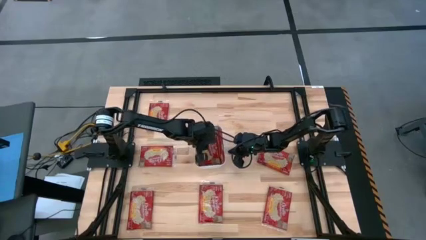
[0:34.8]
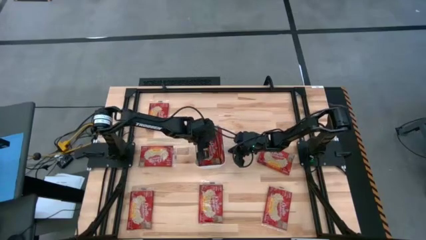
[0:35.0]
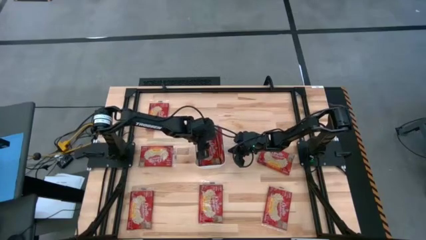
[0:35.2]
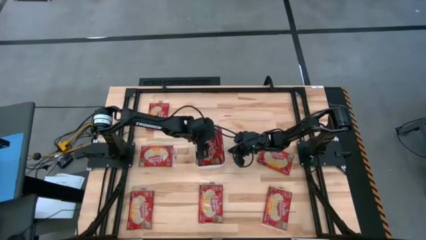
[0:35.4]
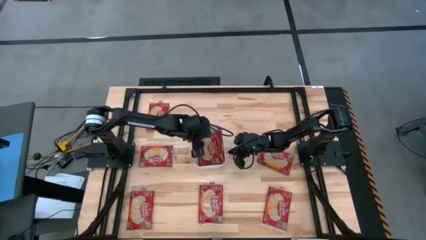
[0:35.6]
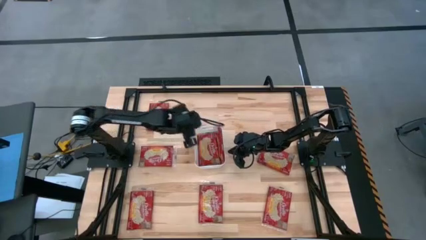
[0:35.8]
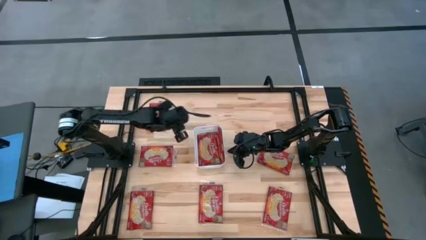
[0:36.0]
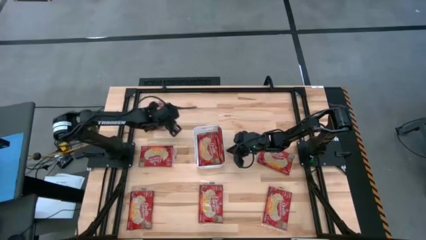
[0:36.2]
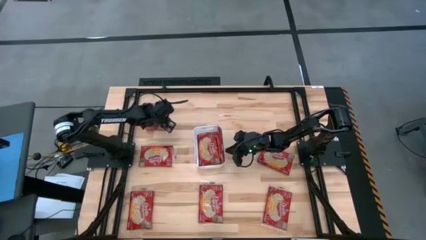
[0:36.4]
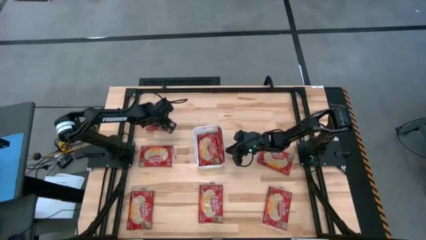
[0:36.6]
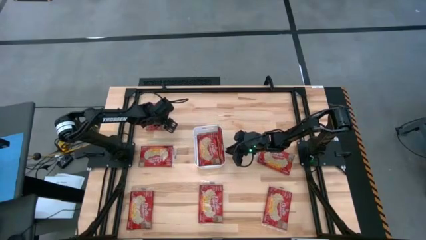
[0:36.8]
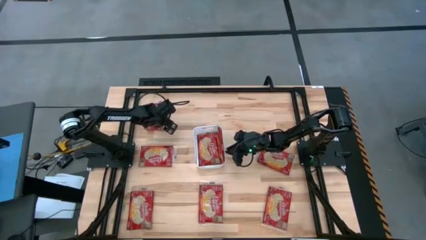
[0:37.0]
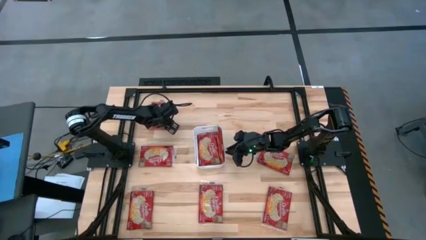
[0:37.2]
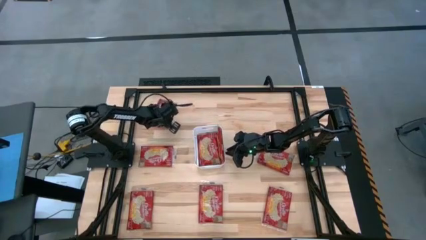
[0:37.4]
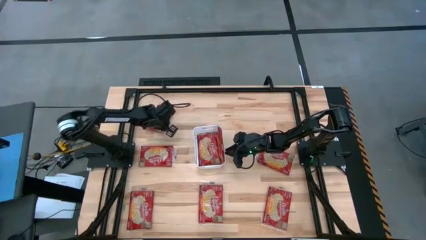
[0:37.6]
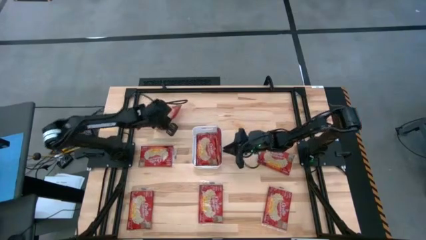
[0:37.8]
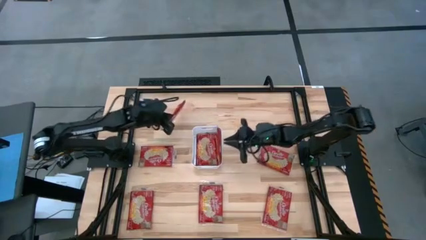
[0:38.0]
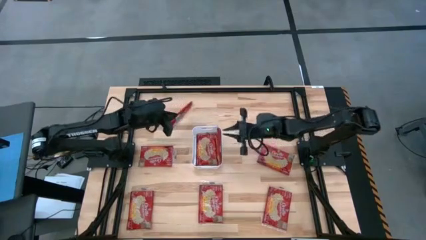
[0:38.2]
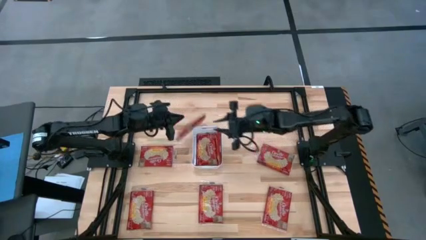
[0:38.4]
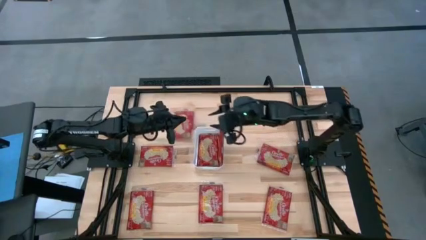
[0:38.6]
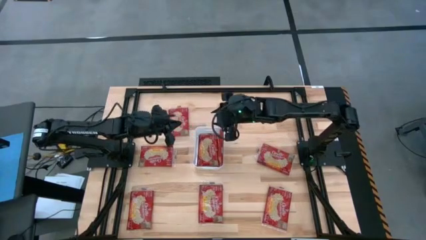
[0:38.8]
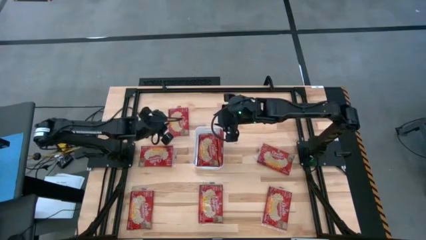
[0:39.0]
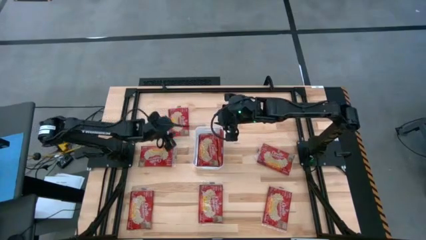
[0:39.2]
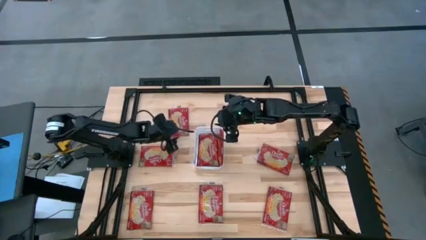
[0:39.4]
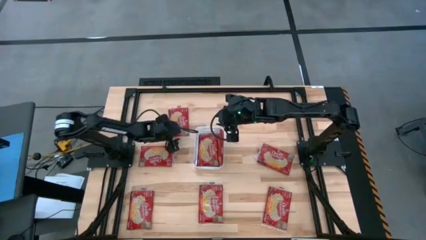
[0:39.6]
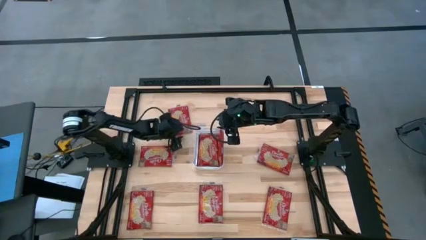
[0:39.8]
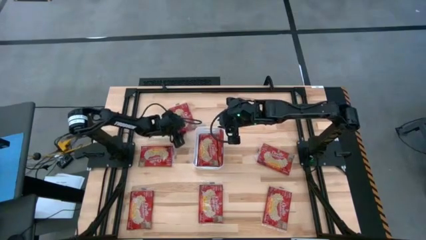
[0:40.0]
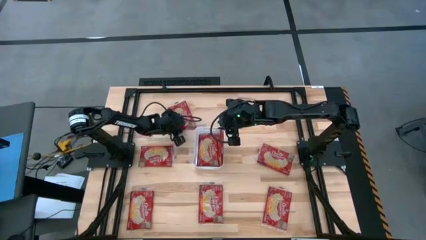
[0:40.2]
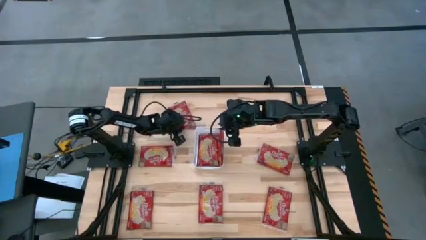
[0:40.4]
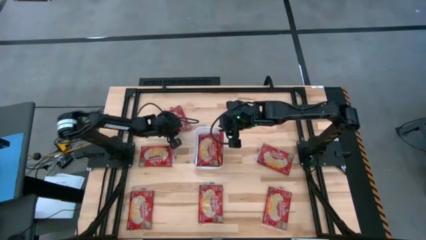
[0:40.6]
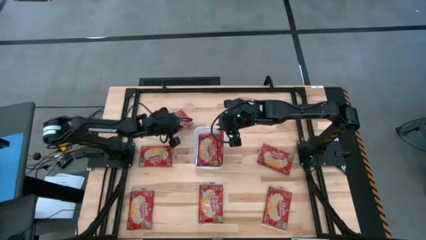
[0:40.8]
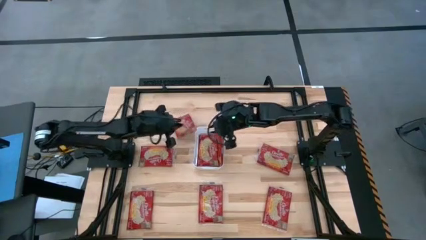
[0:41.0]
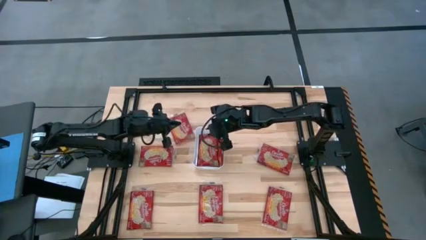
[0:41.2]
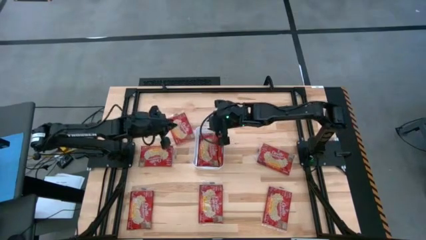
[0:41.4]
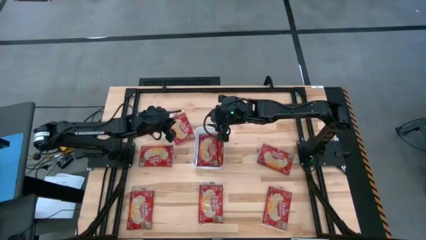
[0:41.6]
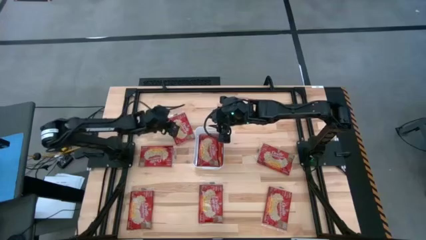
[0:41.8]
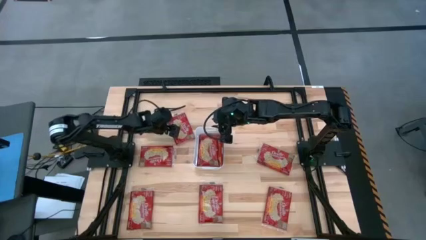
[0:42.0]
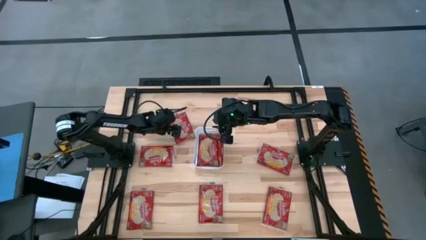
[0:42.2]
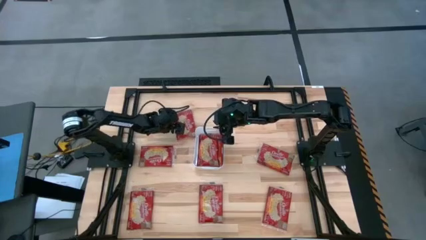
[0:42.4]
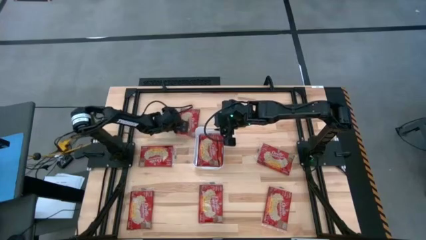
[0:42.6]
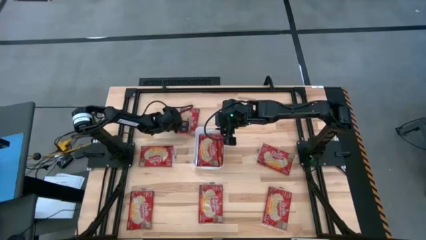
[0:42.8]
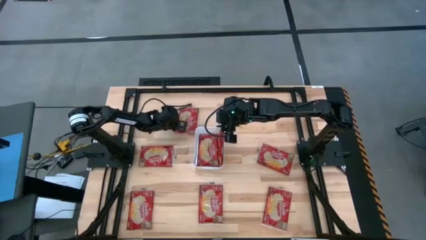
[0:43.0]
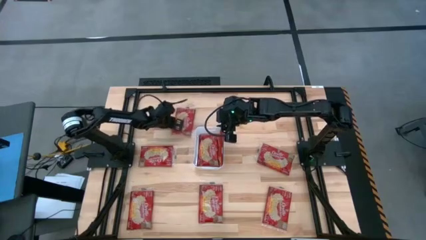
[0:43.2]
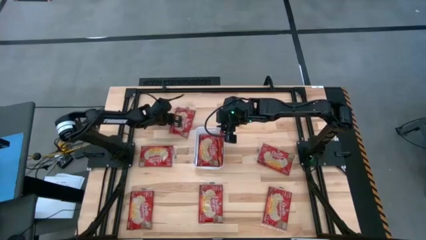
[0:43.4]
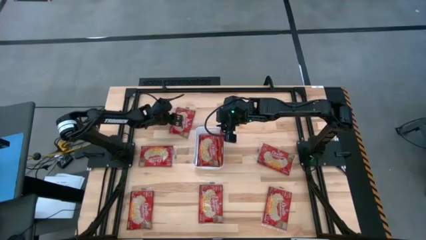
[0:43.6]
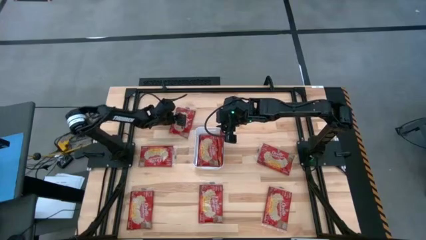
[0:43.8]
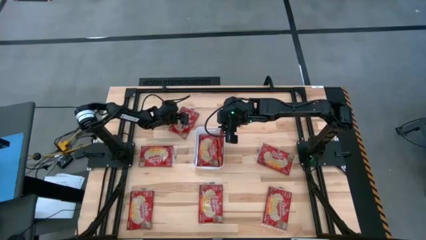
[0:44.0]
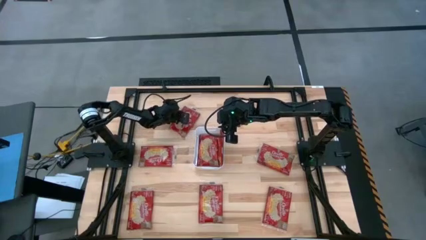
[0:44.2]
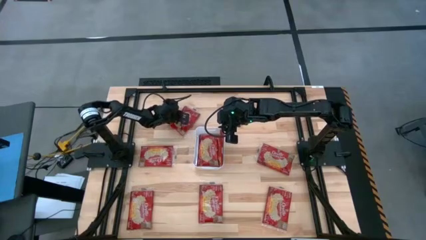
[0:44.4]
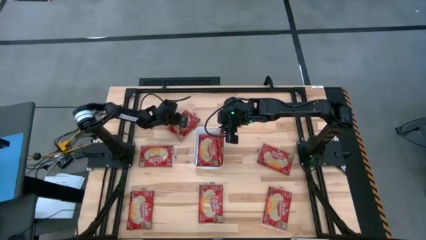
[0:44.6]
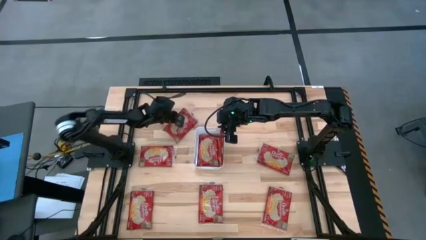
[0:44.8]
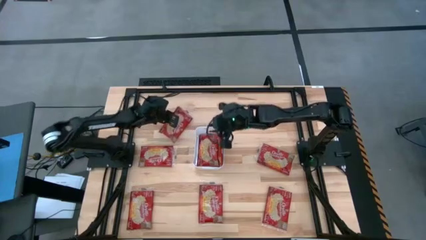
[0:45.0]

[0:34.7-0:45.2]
Task: Sort popcorn bags into baskets
Put the red popcorn bag into the white bin

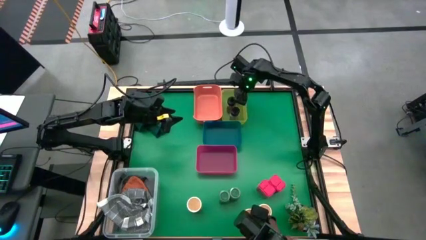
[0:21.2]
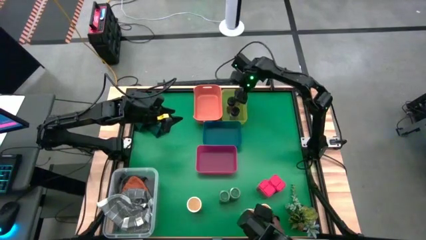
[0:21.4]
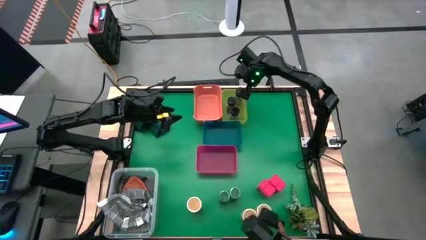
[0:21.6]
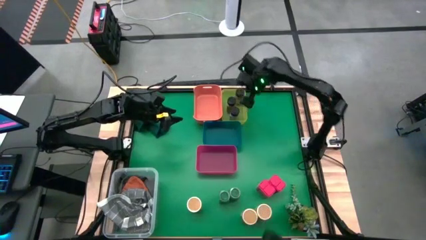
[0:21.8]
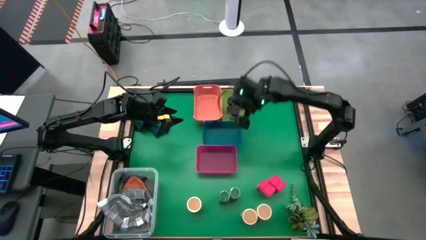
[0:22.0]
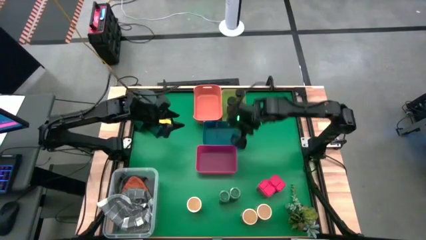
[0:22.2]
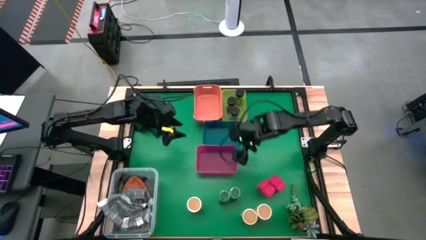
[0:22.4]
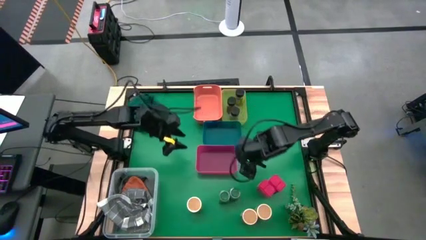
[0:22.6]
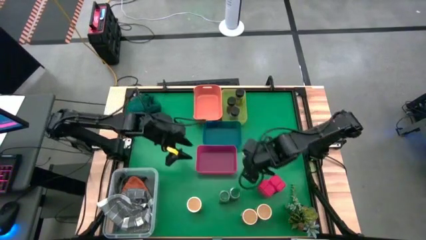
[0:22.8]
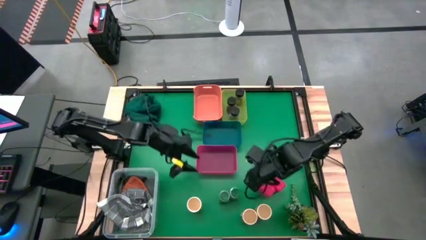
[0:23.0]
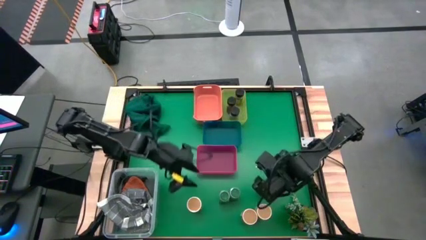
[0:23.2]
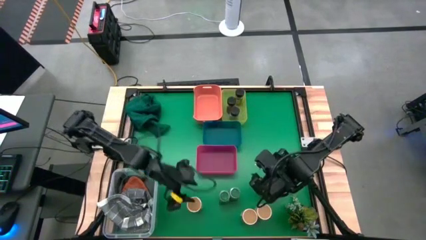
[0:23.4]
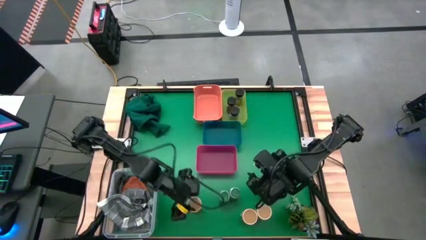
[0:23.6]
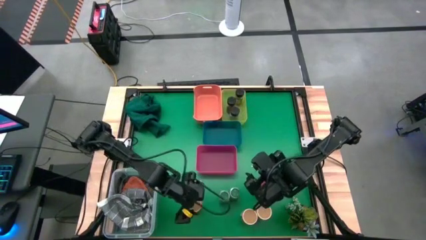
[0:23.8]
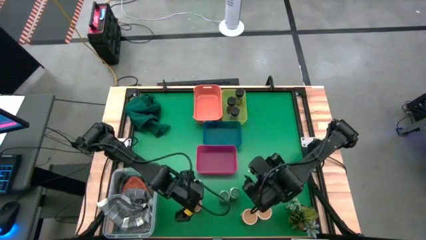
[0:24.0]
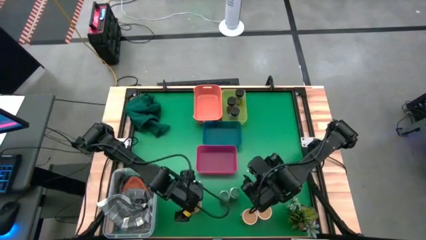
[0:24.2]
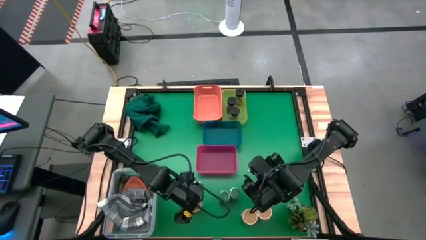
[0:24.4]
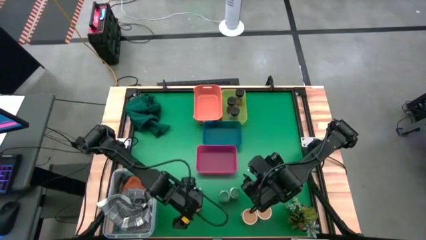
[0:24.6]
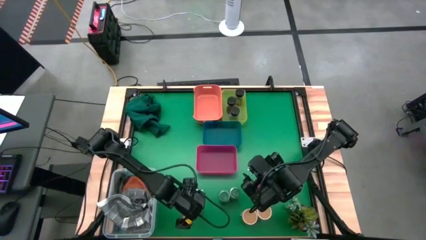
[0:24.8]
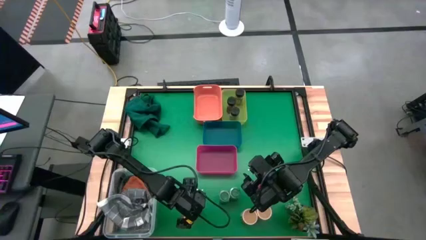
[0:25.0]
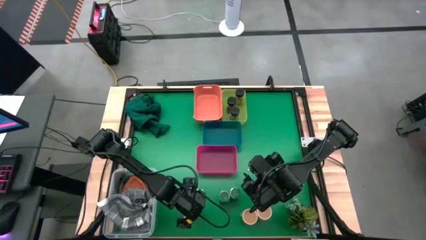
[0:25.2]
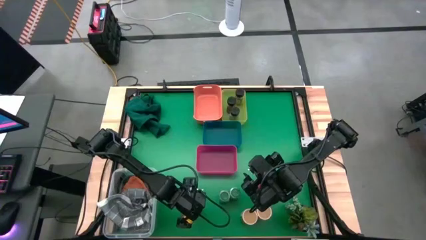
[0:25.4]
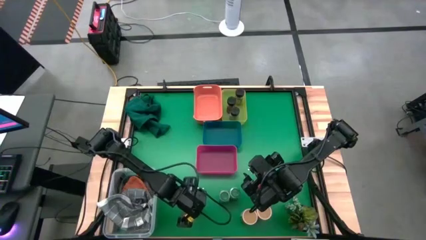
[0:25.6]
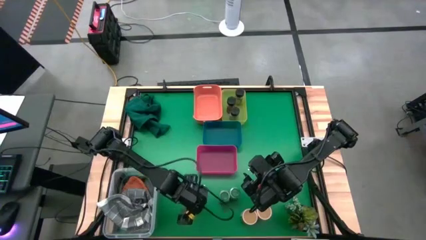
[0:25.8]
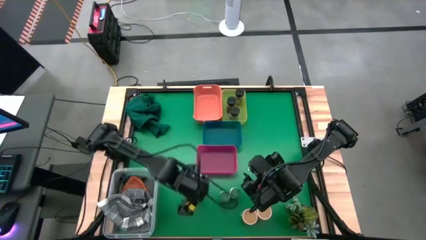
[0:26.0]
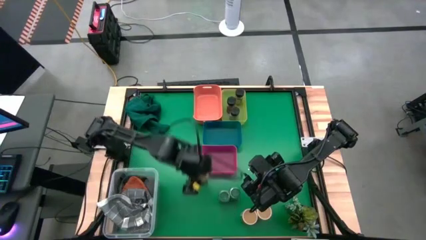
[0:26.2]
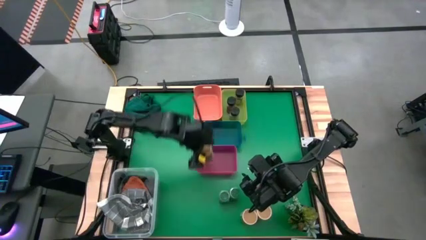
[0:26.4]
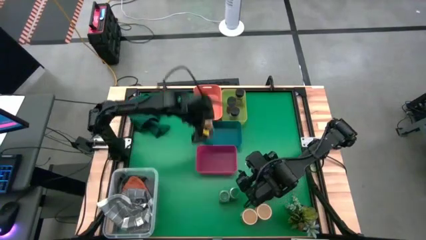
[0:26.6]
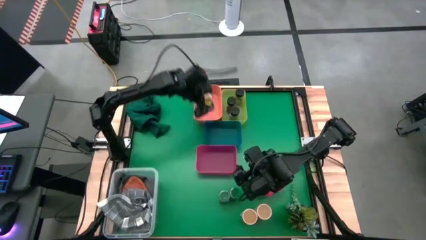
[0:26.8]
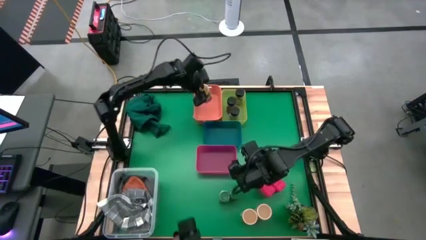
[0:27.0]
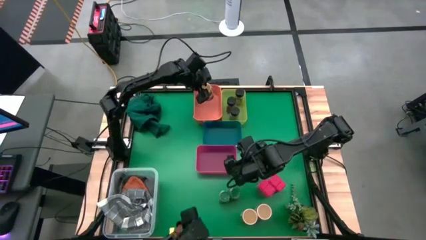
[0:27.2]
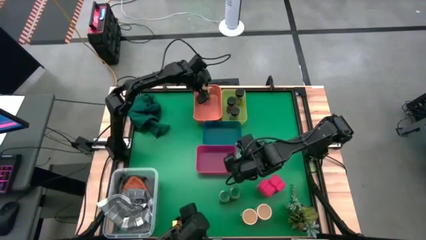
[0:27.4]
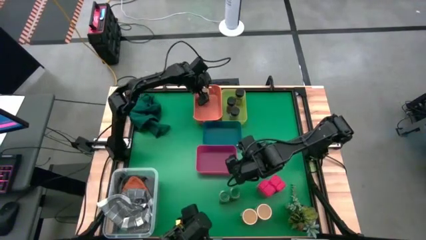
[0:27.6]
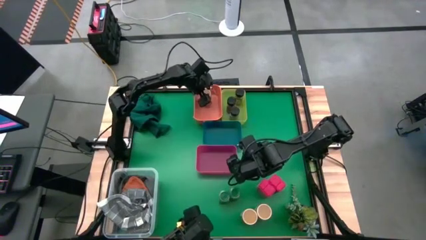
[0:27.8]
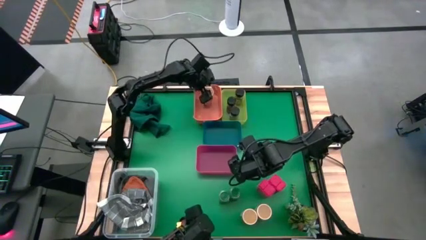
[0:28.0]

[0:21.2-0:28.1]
Task: Sort spices by type
Put the left gold seasoning bottle into the orange bin
